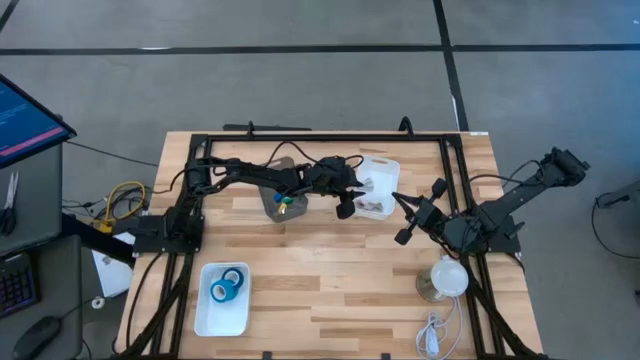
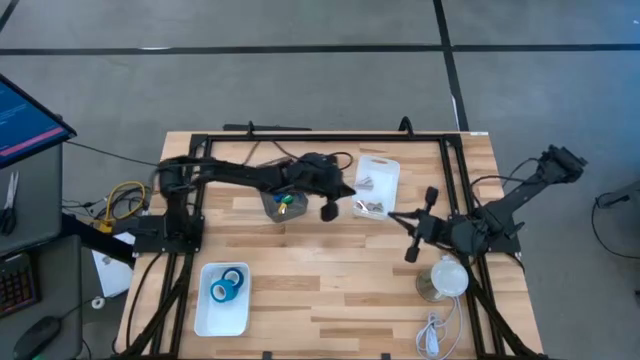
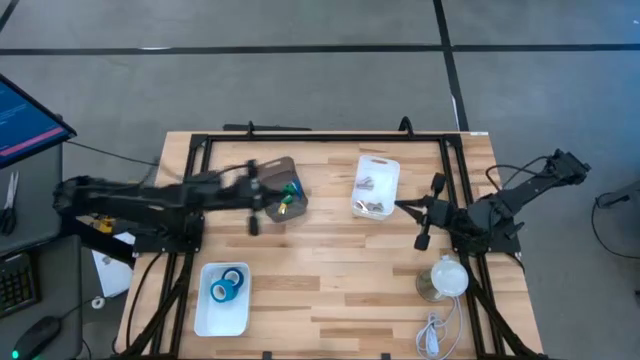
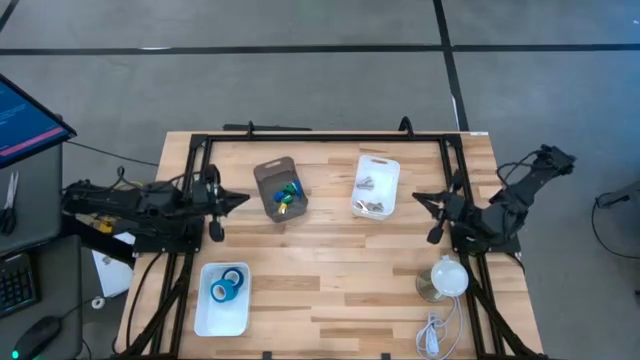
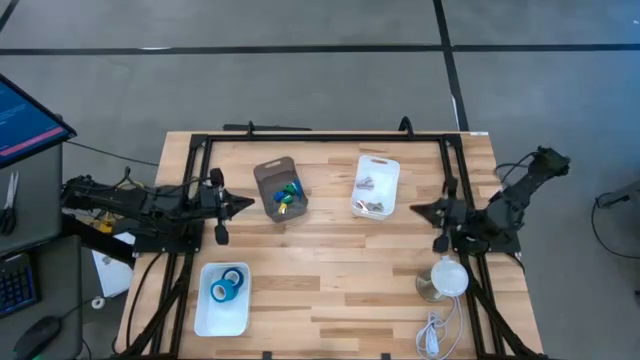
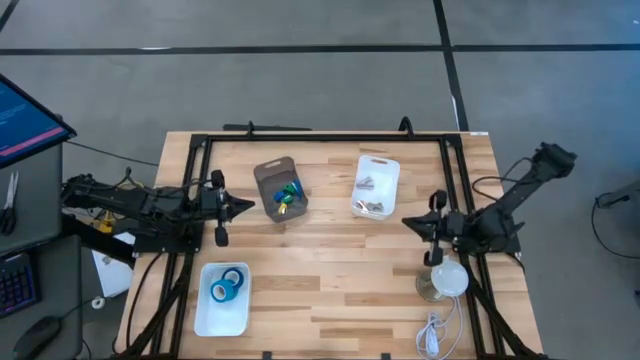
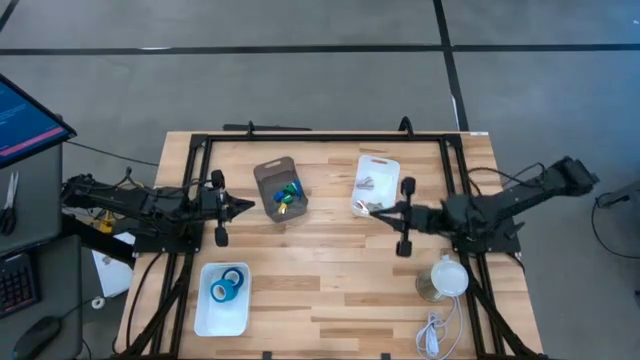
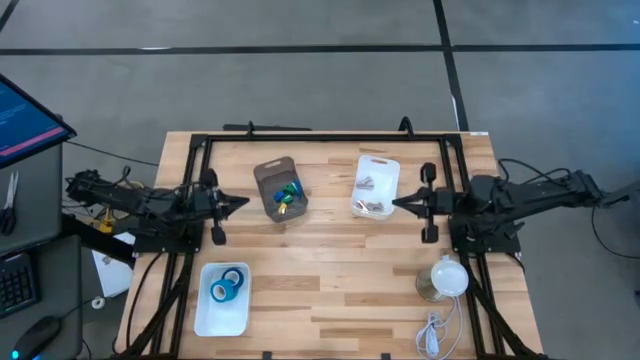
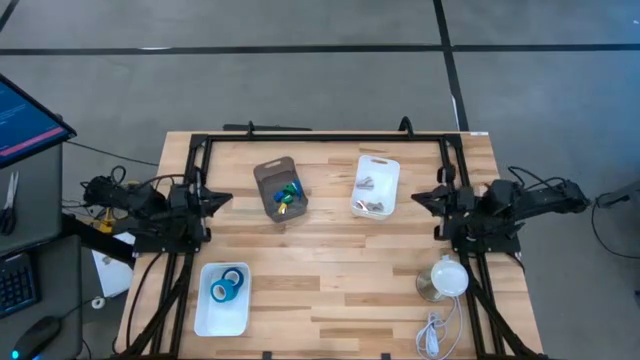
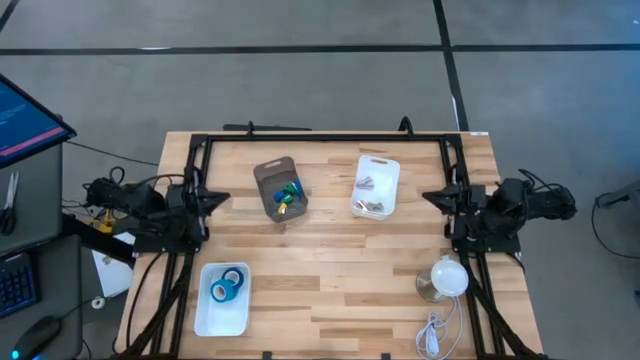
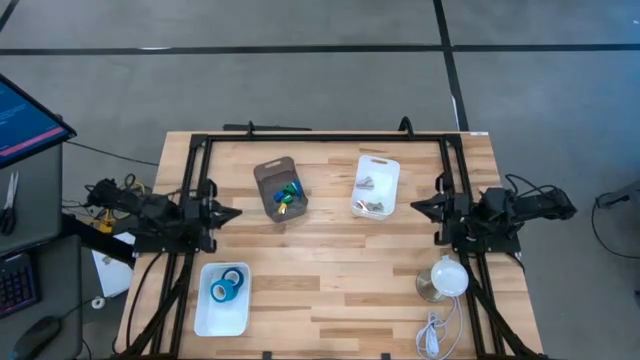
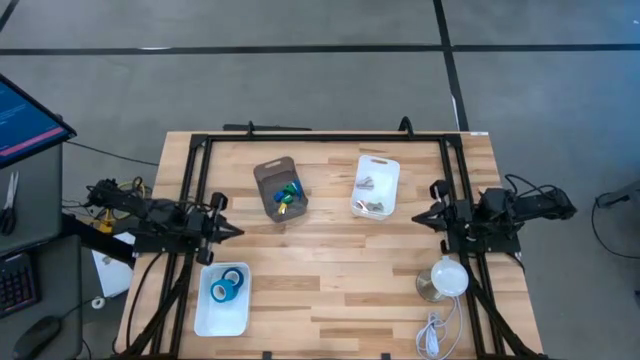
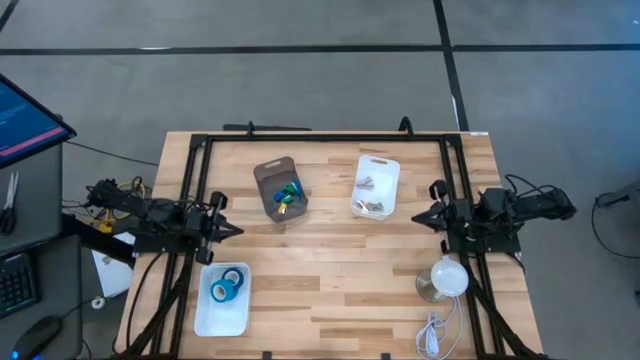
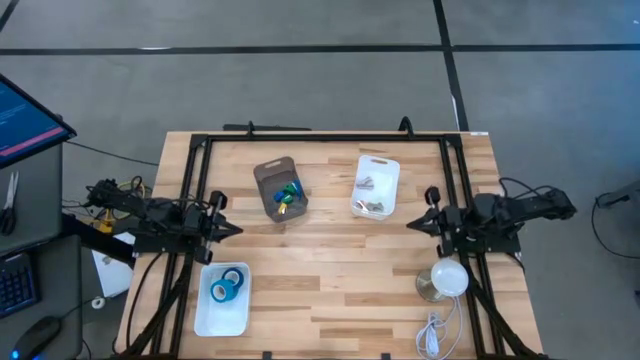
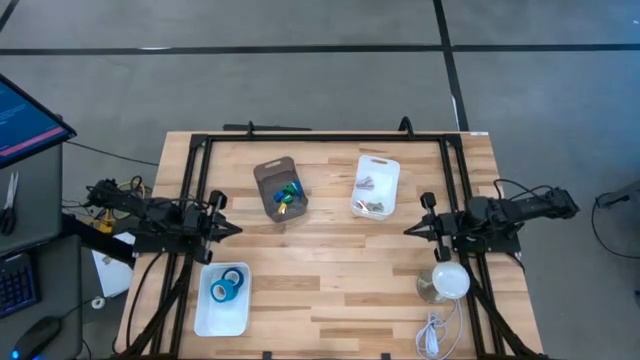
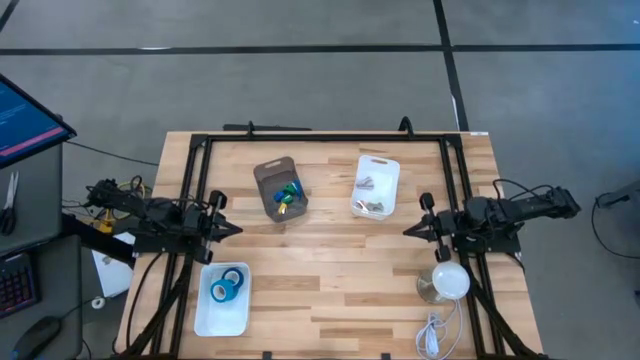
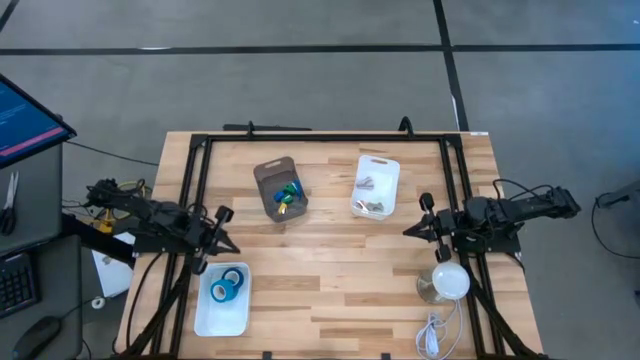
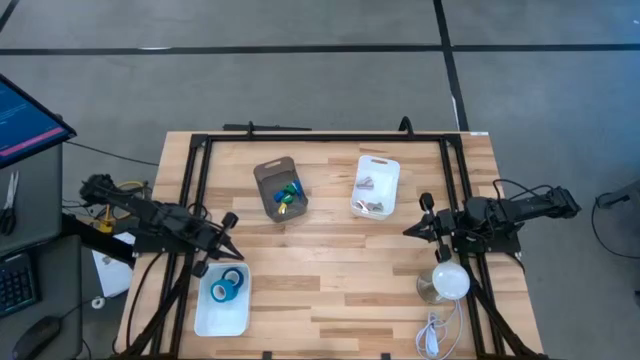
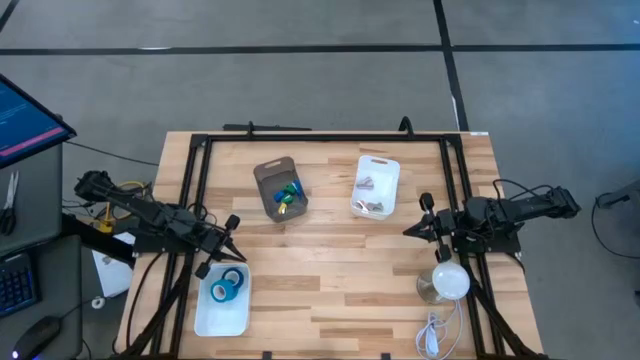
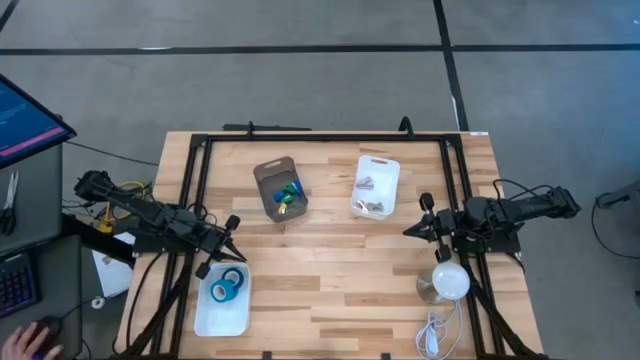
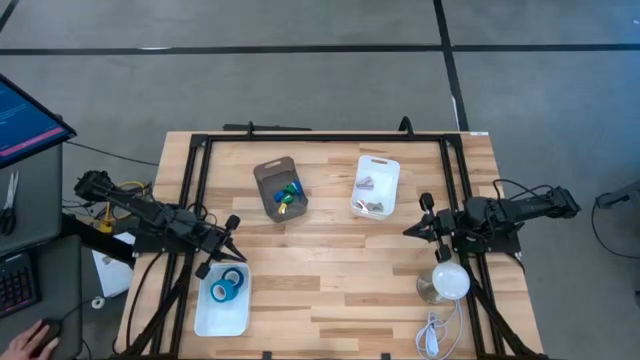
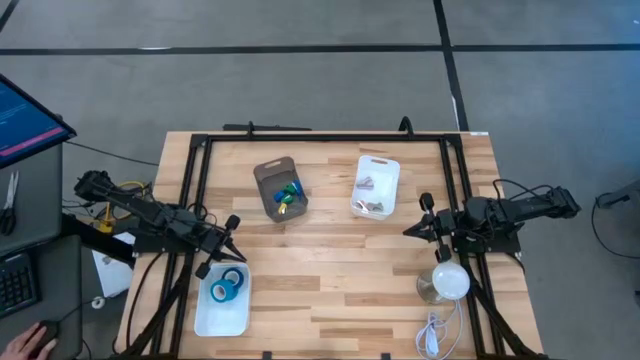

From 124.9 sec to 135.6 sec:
Task: Pick and place Stapler, Stapler remover, tape
Return to Home Position

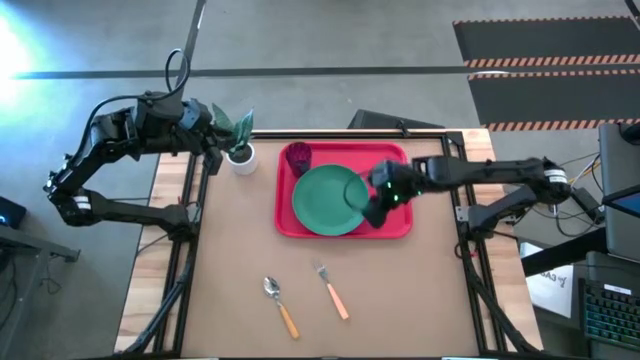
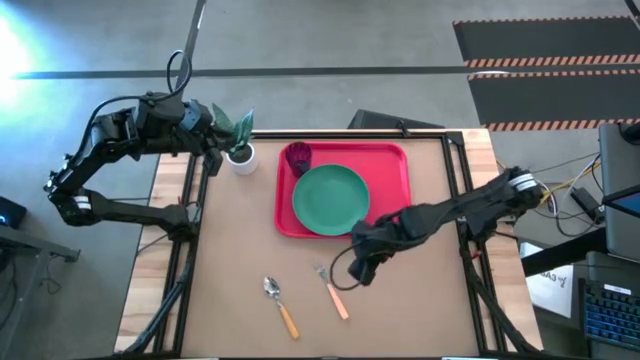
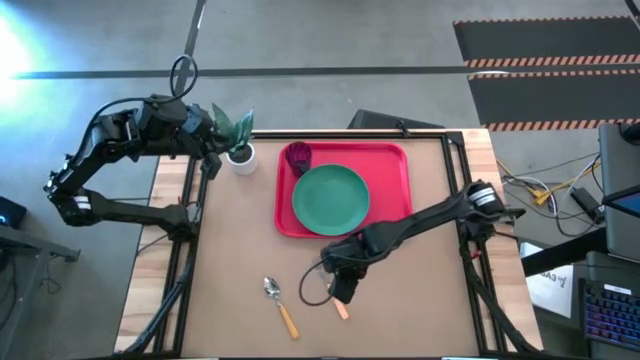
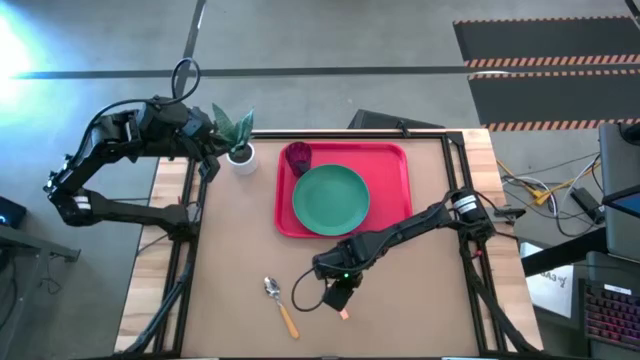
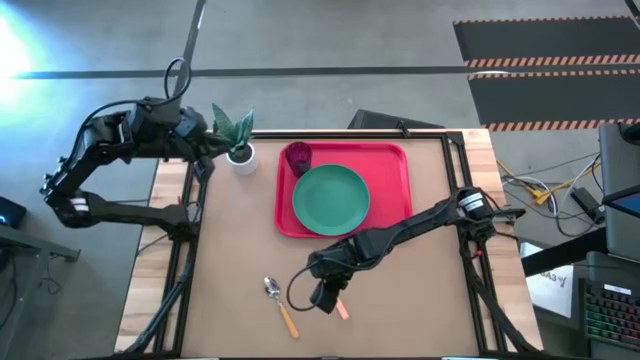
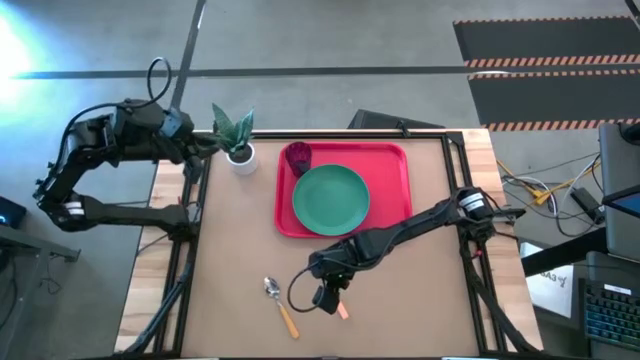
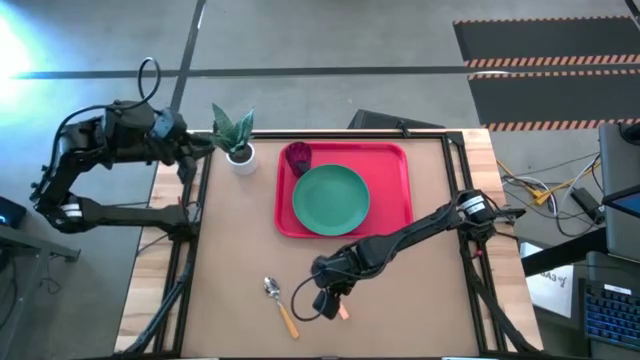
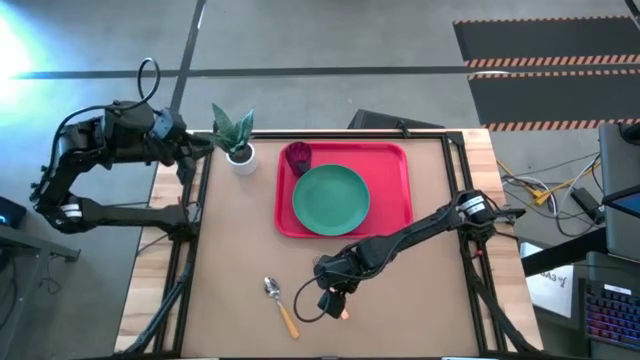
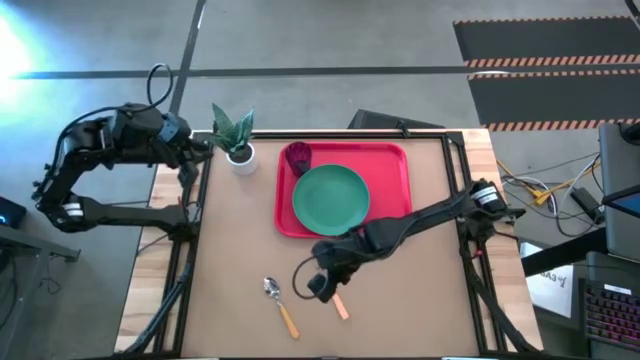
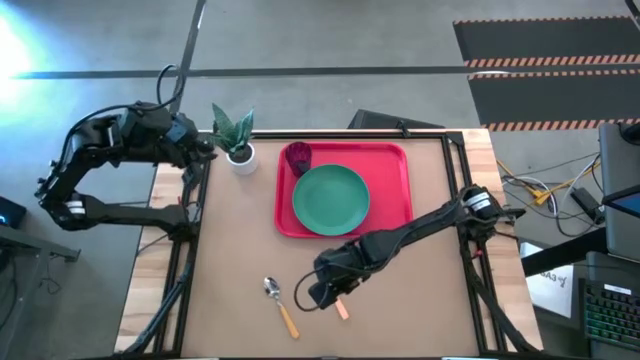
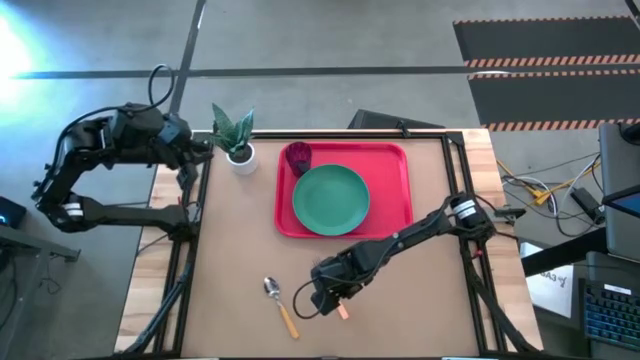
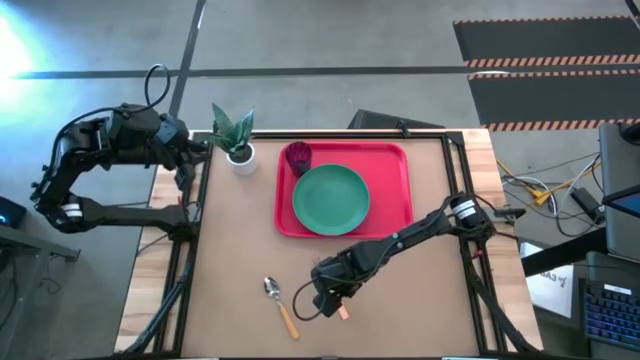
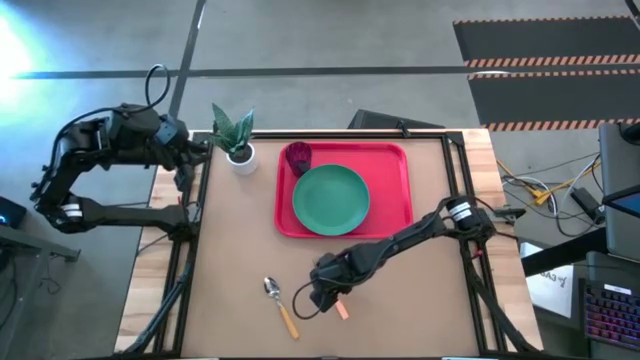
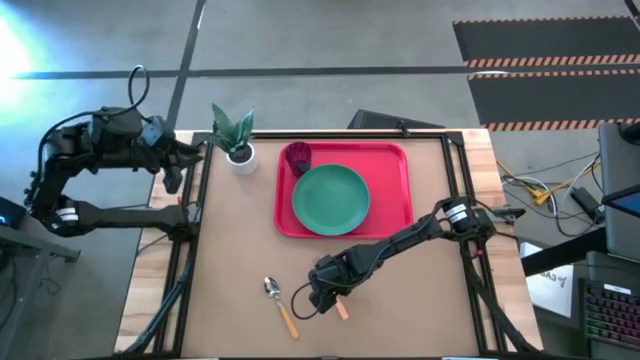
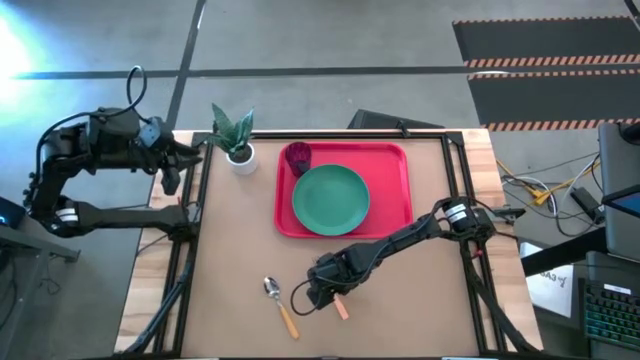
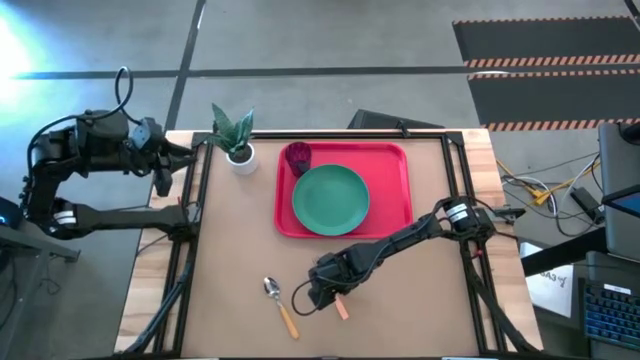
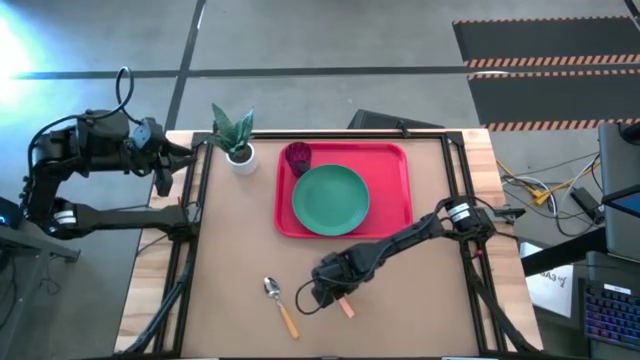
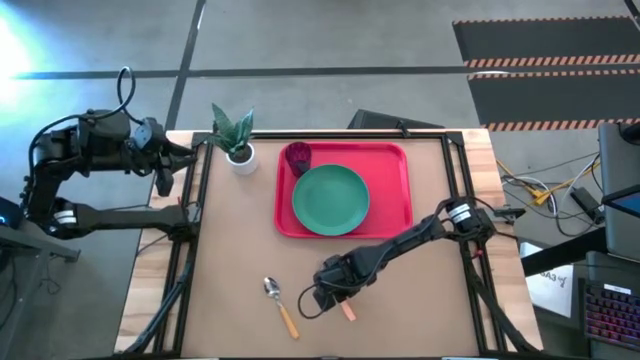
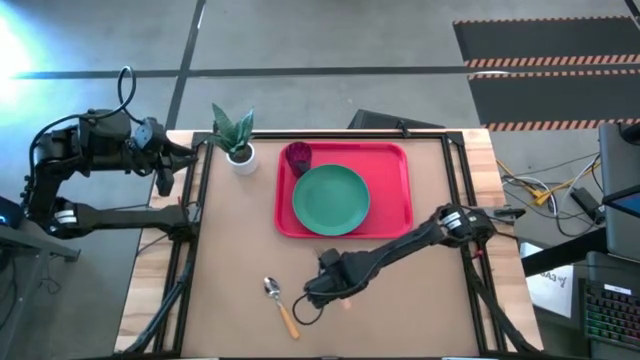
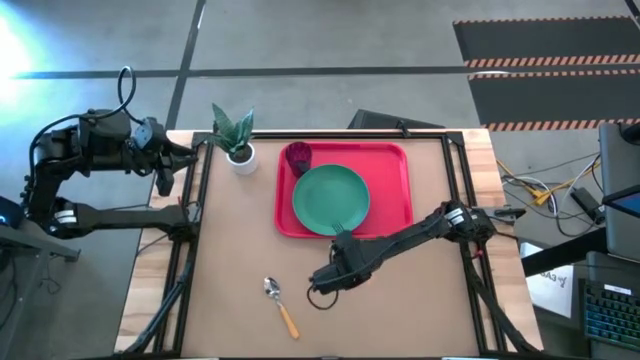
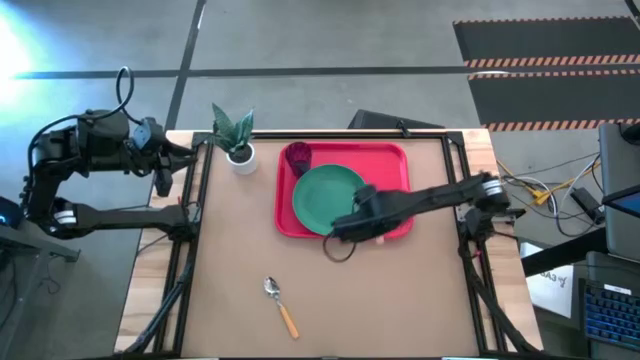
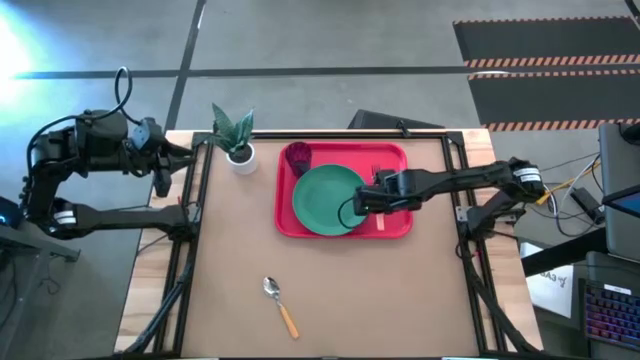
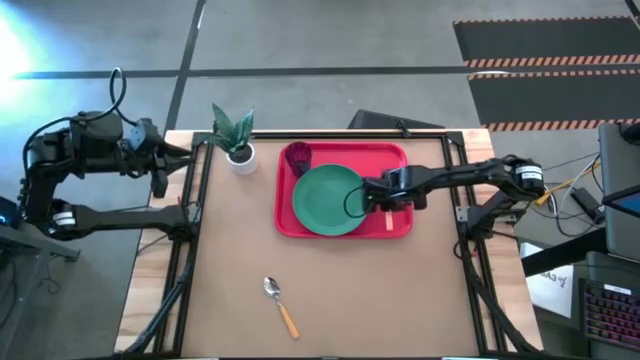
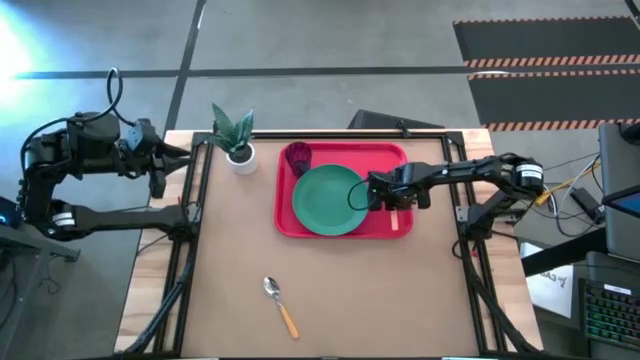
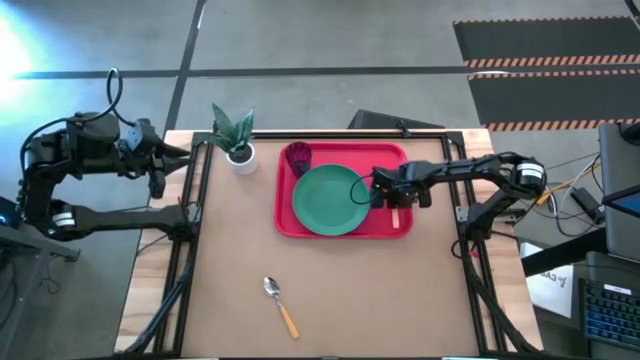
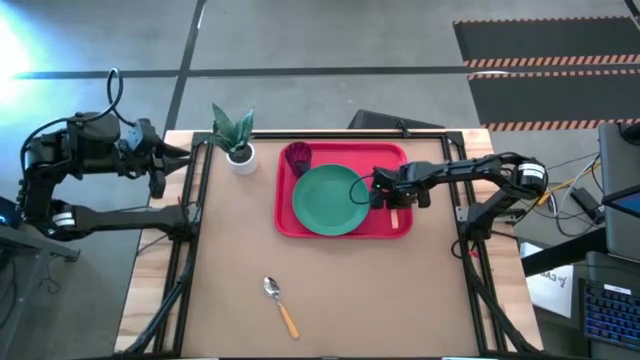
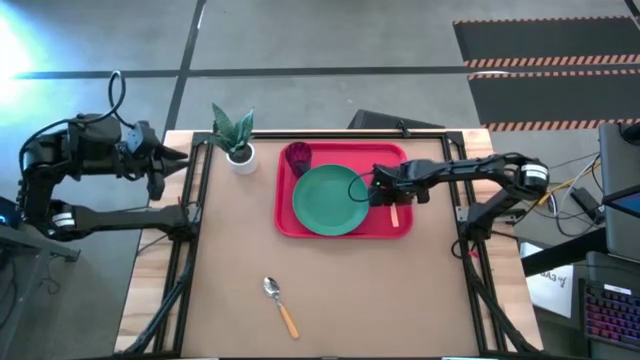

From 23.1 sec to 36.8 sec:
Task: Pick and place plate/cup/fork/spoon on tray
Put the light orange fork on the red tray to the right of the green plate
